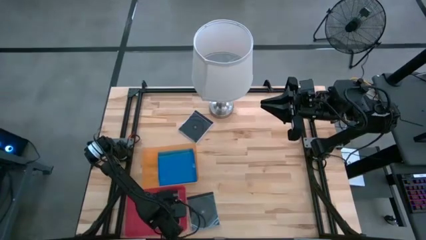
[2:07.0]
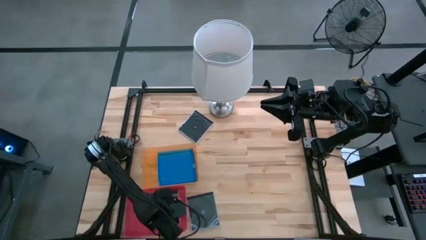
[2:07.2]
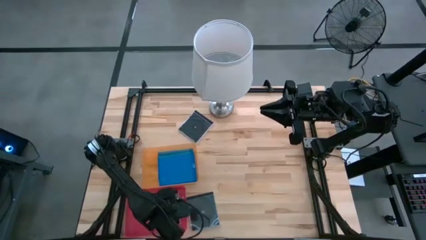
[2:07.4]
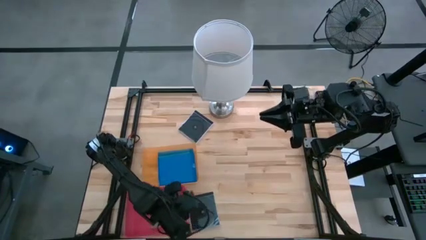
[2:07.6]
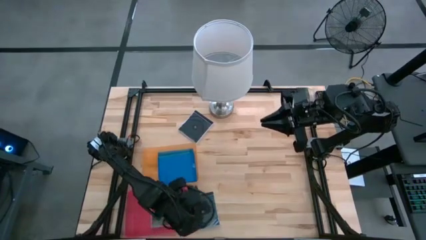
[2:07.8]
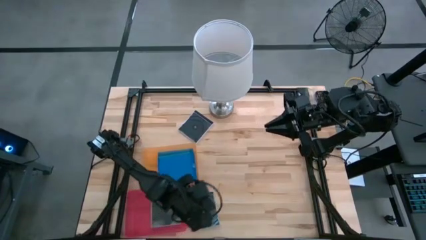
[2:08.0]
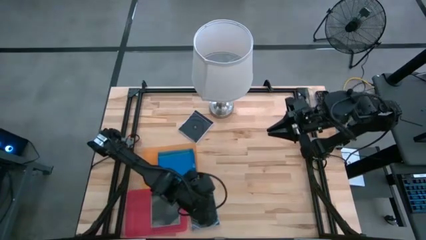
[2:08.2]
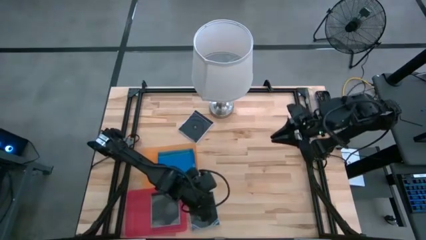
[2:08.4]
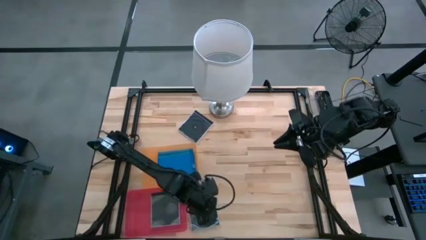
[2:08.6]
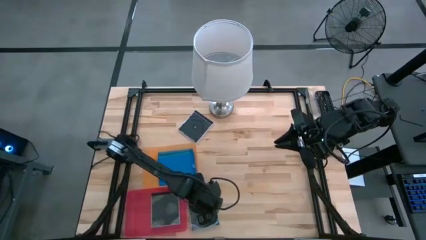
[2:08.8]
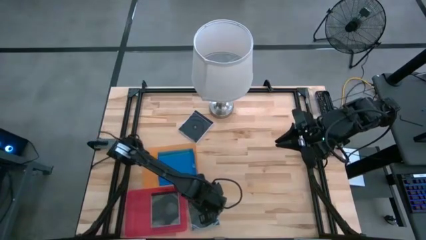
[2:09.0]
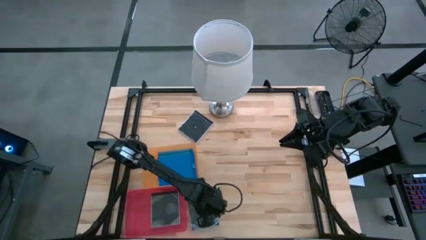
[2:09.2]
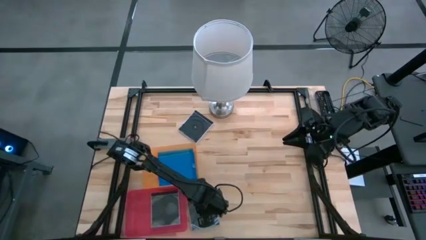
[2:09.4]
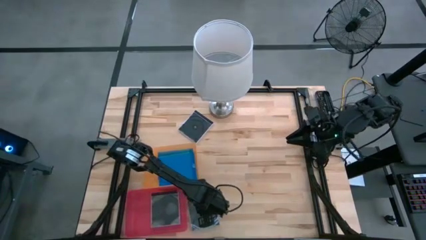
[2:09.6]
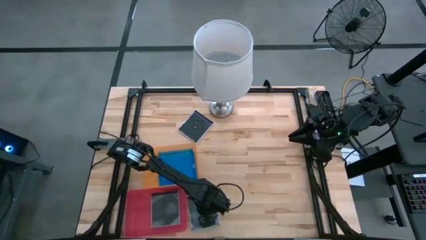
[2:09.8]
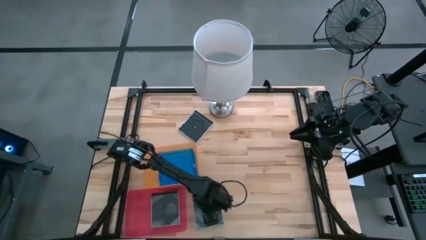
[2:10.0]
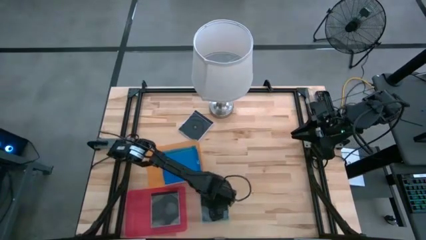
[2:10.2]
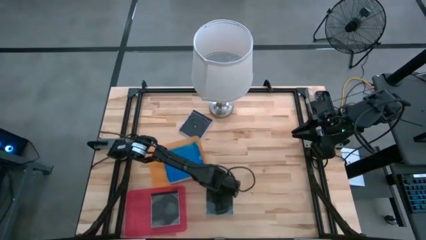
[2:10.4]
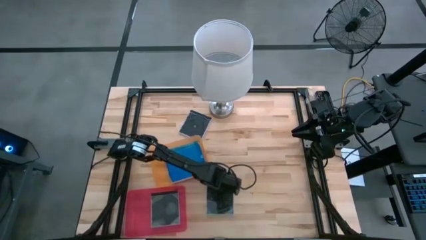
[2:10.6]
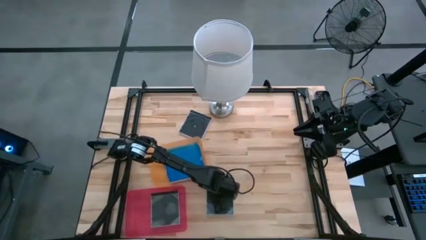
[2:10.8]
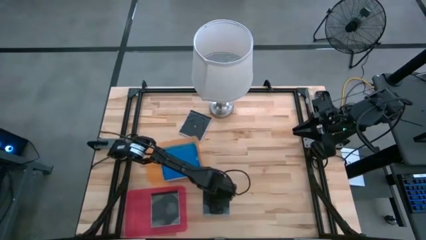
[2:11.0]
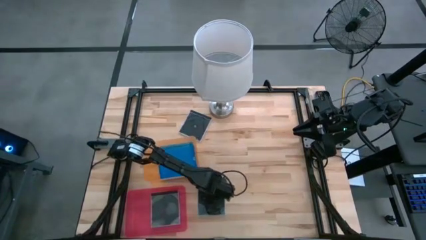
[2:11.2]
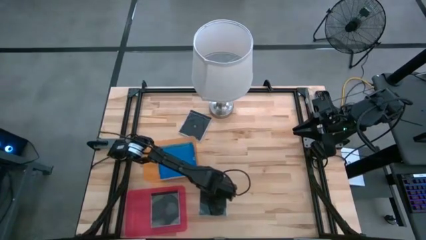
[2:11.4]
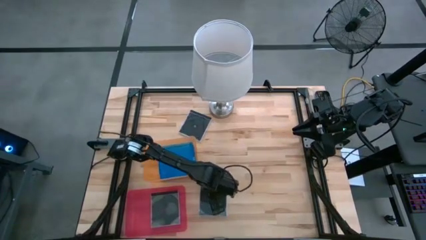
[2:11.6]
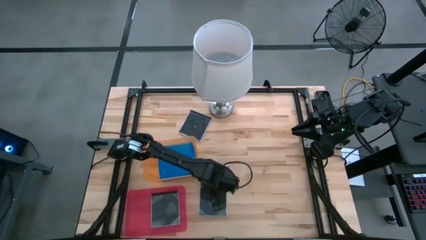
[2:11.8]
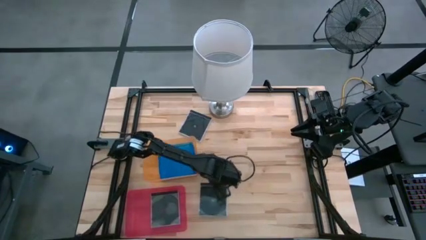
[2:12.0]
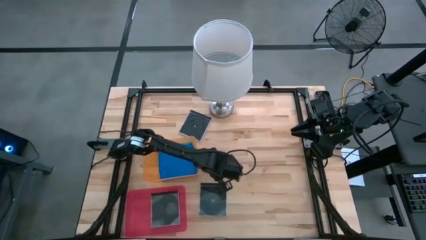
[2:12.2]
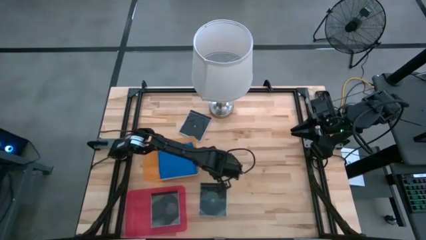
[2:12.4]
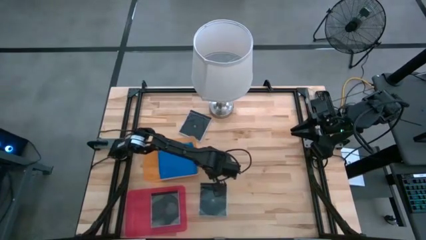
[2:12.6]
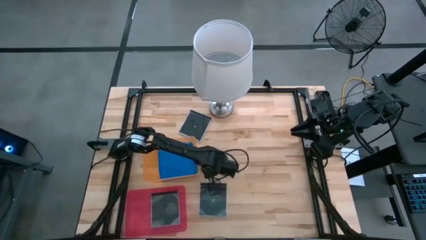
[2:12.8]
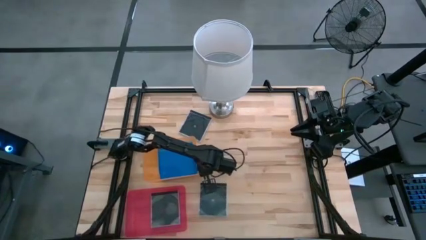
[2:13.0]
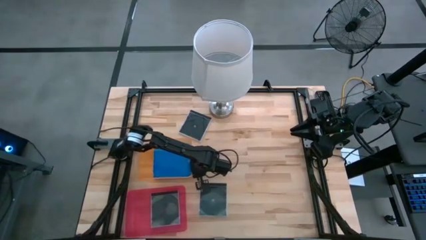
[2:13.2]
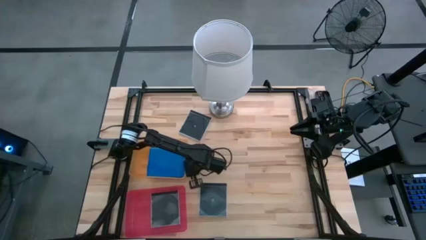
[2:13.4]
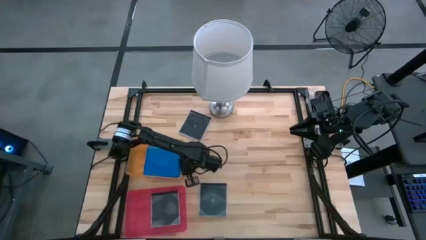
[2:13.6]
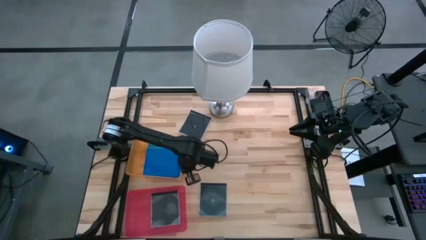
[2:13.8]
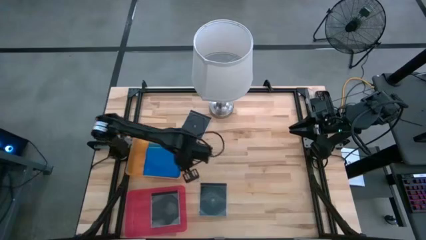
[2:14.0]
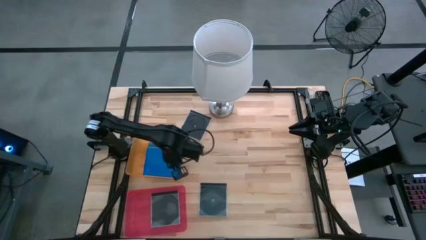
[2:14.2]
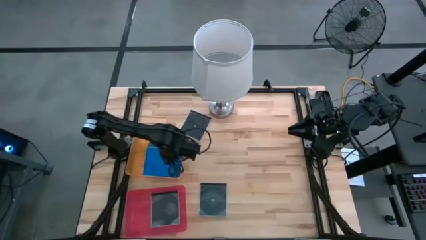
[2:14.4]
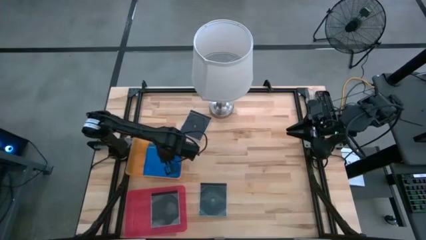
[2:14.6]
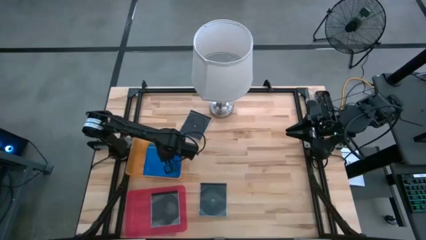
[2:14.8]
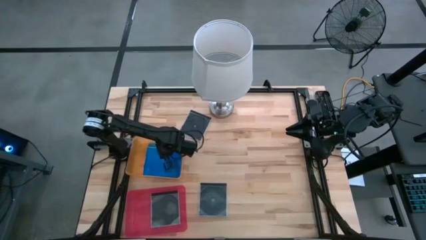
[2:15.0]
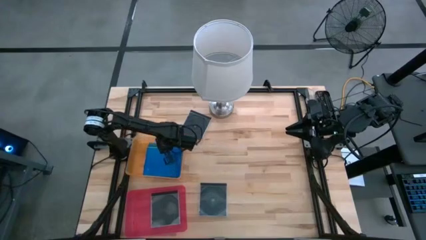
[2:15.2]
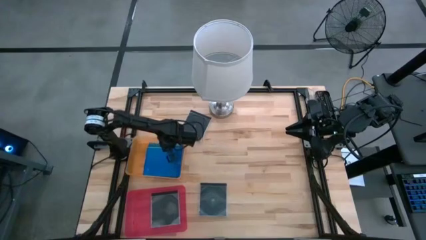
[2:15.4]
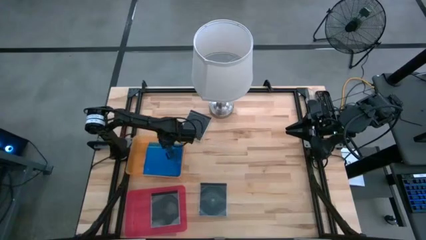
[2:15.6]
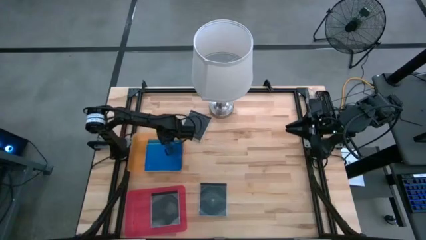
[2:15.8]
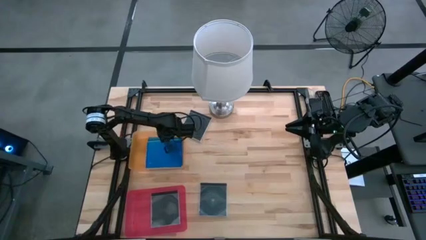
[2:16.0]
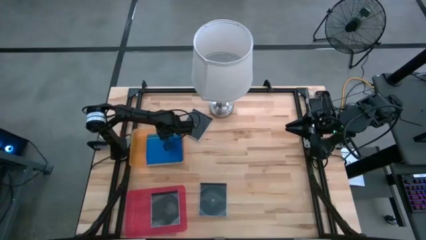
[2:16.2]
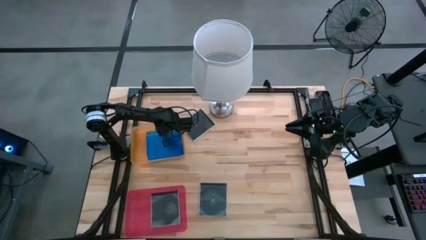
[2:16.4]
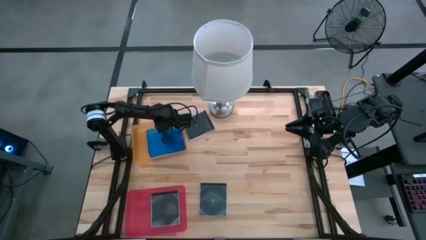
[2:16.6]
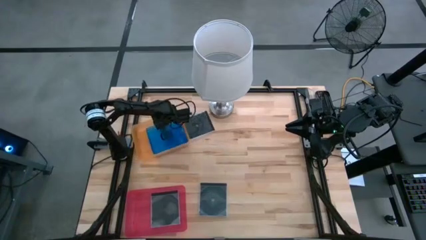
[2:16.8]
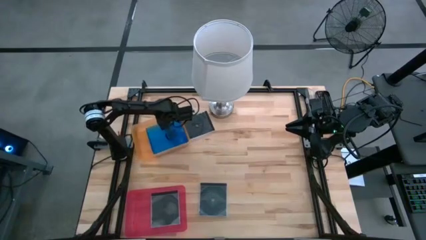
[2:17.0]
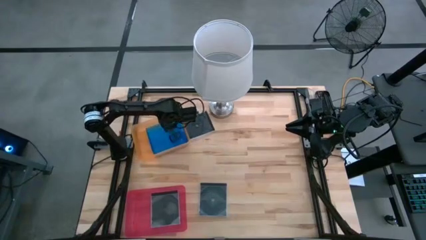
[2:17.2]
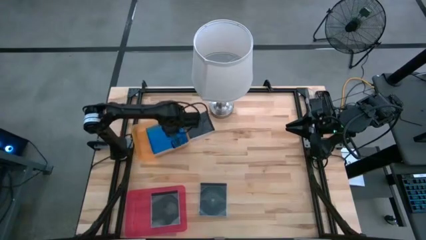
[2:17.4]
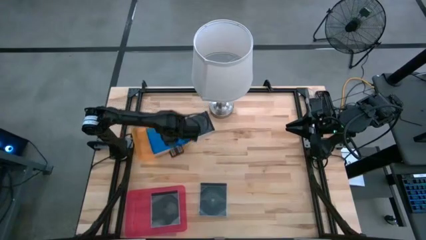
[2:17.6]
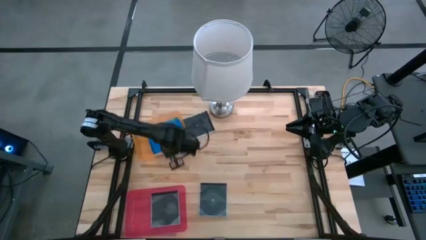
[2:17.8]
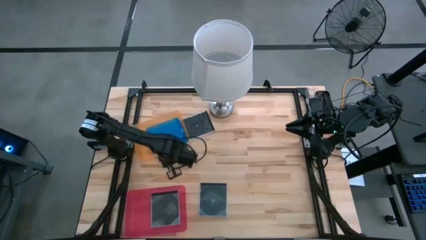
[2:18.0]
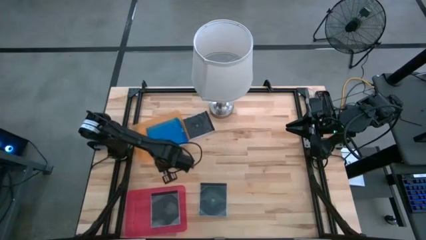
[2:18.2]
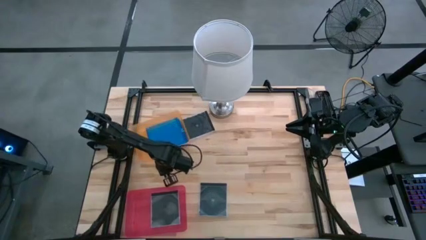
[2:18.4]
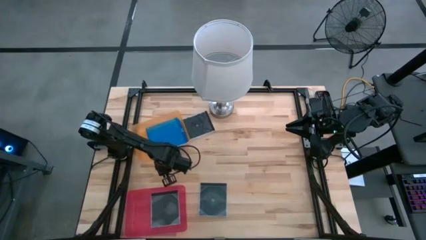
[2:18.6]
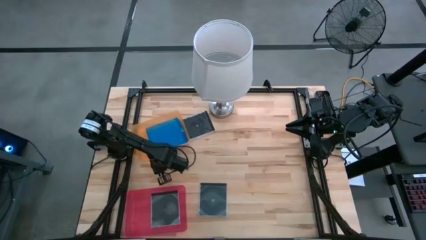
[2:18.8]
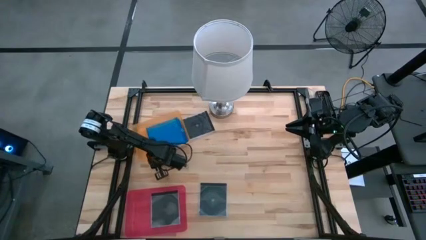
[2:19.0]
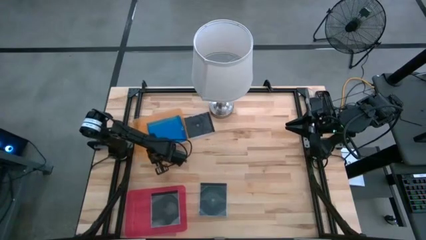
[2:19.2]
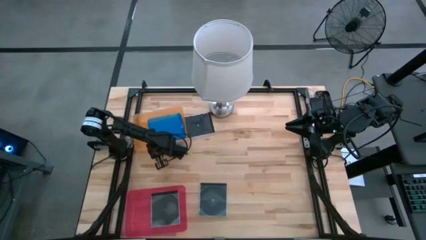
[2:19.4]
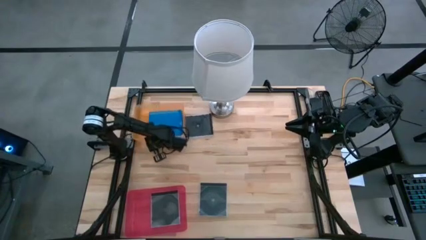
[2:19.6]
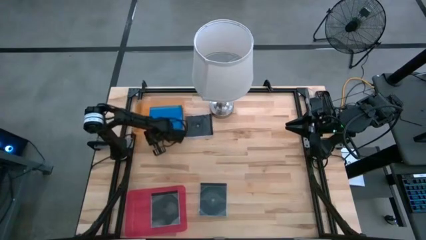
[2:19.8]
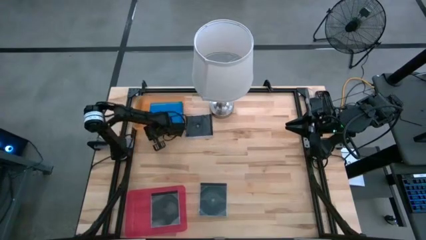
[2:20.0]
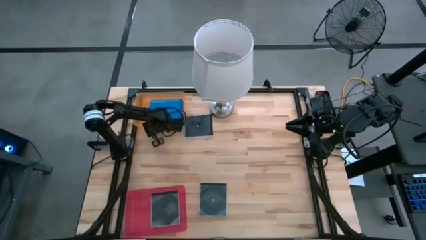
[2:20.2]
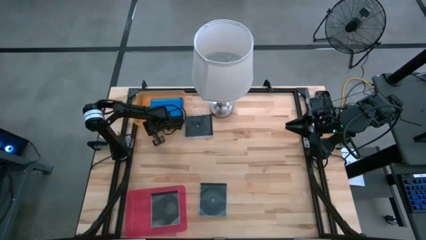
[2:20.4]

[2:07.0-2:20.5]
Task: Pick & place jewel cases by type
Move the orange bin to the top left of the table

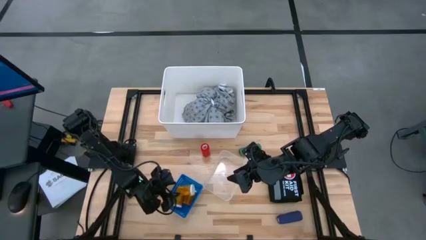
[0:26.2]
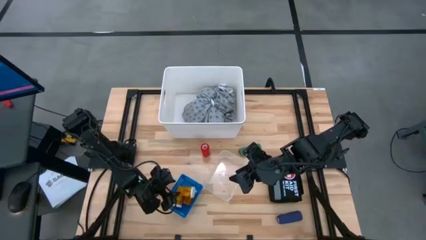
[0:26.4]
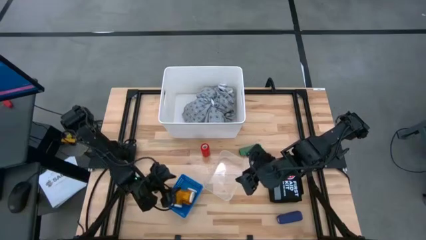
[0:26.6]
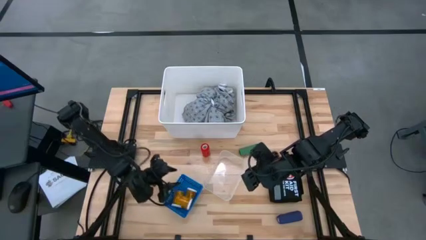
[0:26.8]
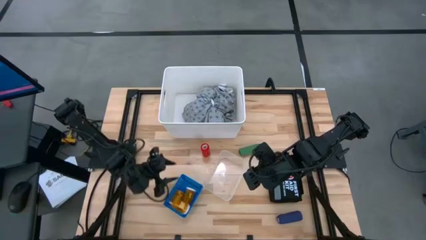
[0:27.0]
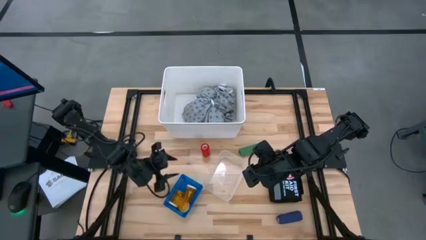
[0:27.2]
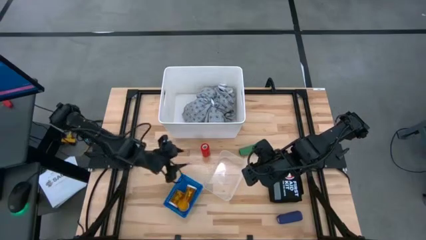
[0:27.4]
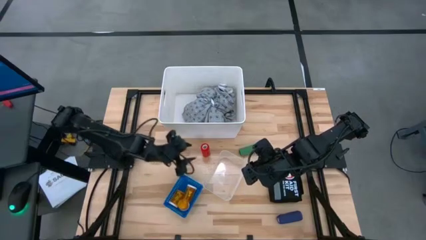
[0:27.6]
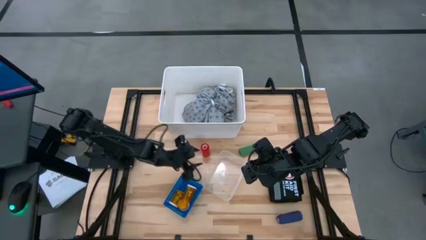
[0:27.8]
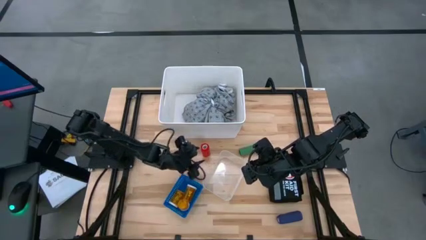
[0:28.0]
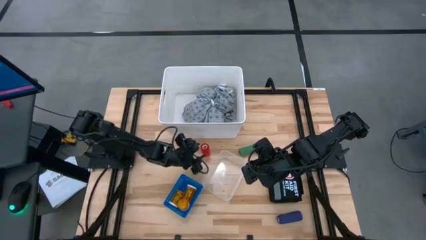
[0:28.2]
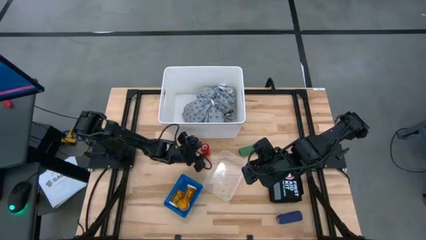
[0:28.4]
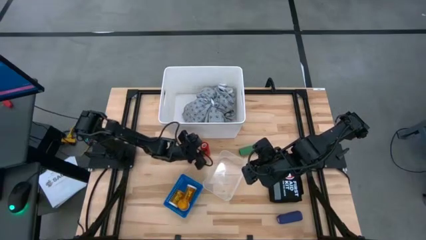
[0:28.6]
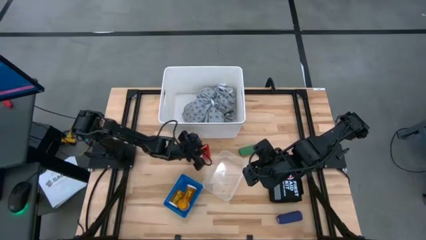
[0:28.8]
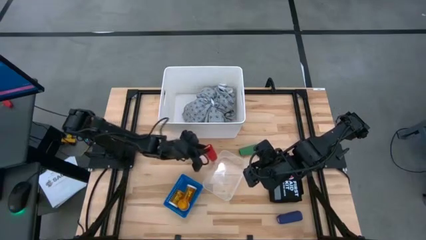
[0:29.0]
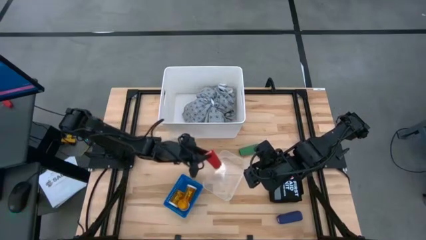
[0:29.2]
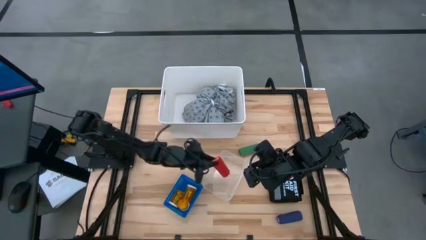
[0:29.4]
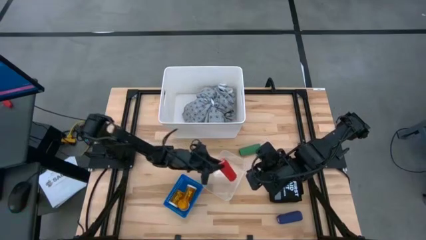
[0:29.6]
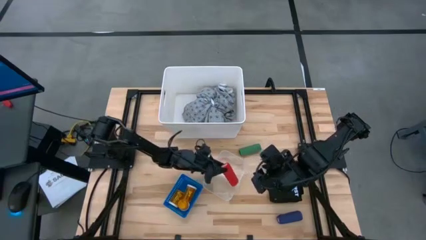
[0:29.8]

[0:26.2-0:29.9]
Task: Pick & Place Medicine items
Put the red bandage into the transparent bin
